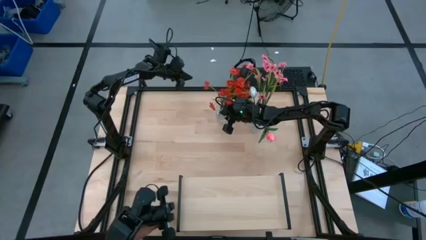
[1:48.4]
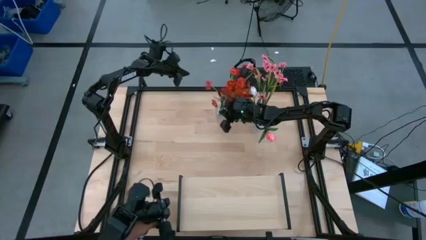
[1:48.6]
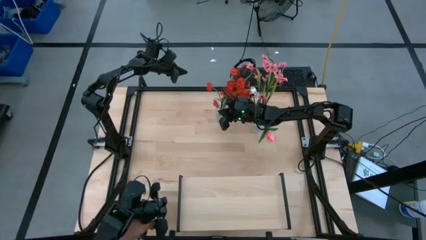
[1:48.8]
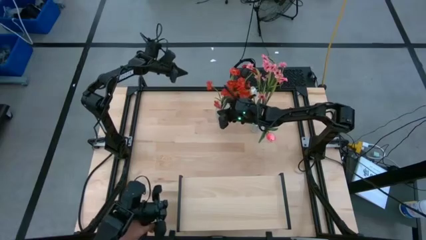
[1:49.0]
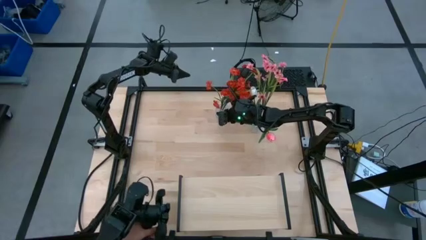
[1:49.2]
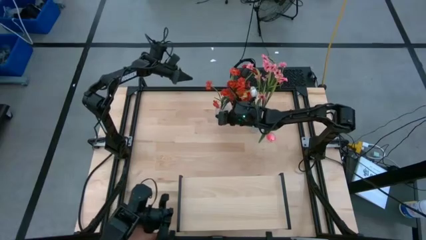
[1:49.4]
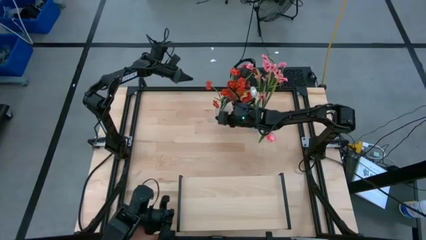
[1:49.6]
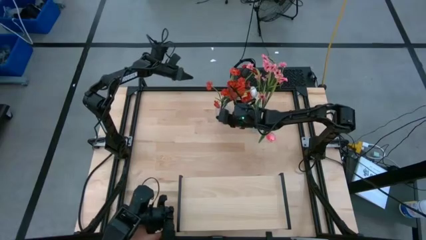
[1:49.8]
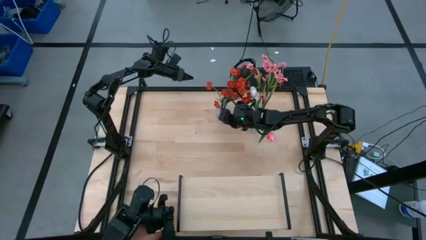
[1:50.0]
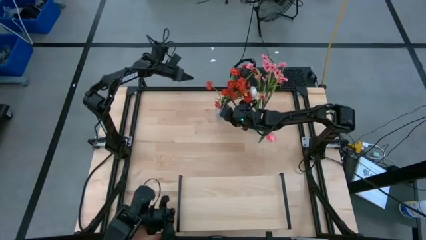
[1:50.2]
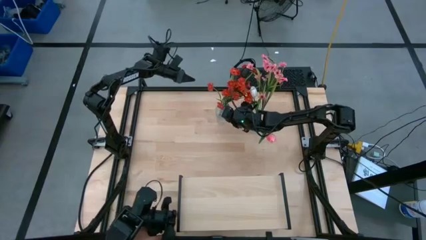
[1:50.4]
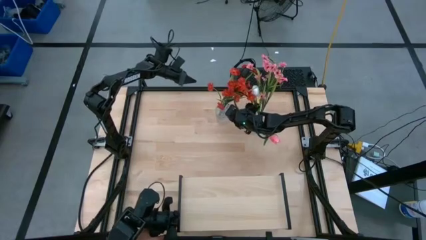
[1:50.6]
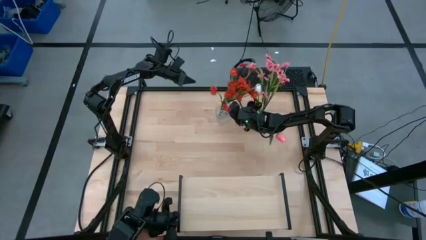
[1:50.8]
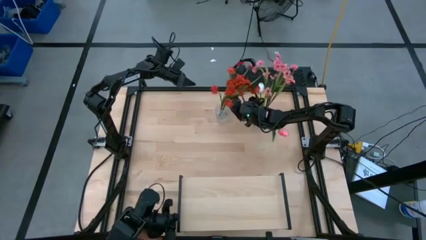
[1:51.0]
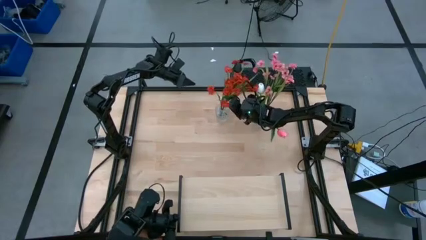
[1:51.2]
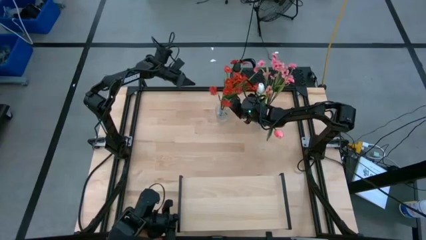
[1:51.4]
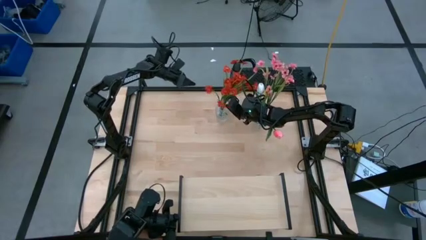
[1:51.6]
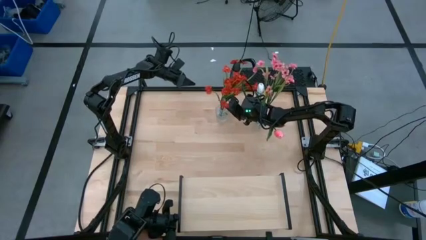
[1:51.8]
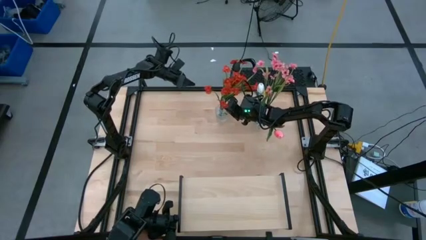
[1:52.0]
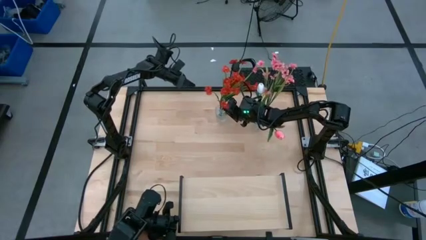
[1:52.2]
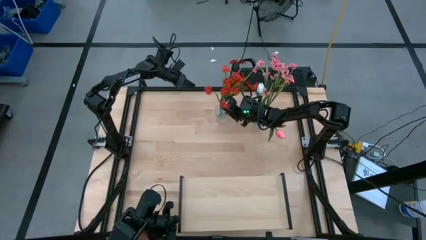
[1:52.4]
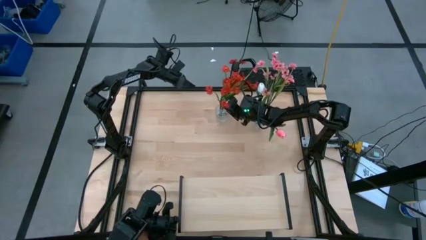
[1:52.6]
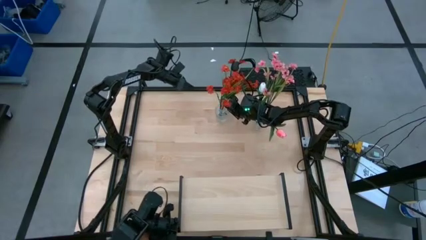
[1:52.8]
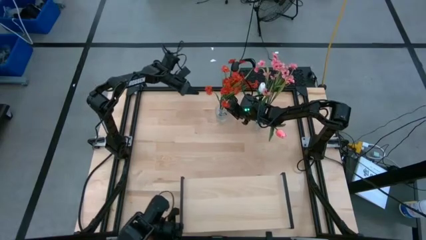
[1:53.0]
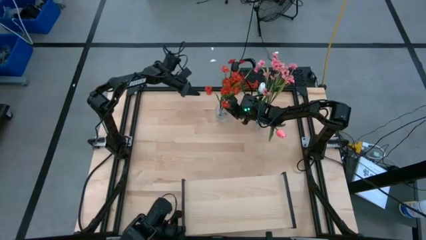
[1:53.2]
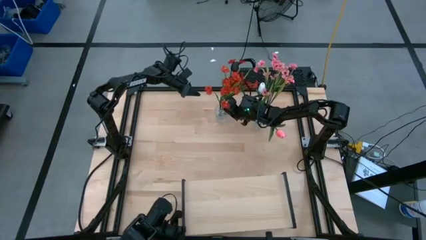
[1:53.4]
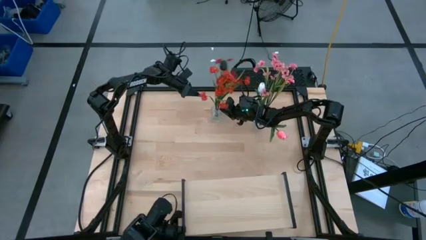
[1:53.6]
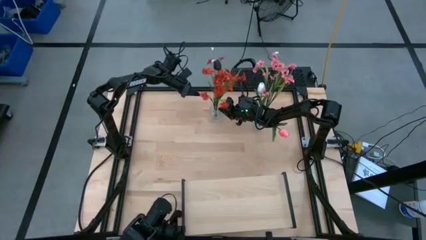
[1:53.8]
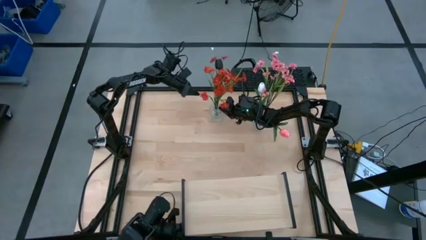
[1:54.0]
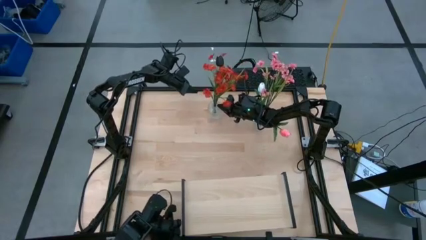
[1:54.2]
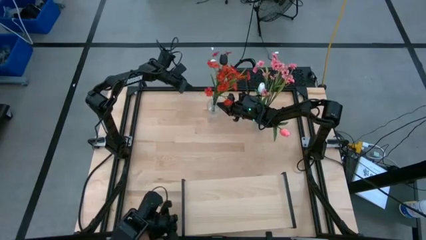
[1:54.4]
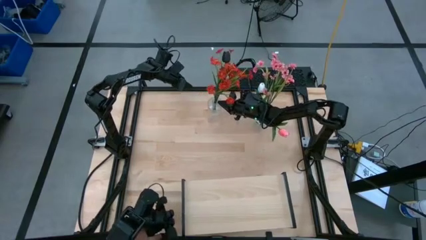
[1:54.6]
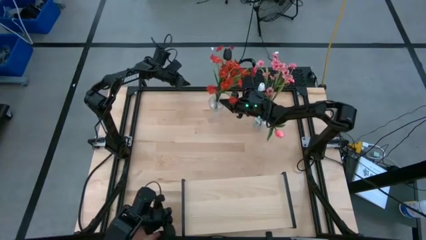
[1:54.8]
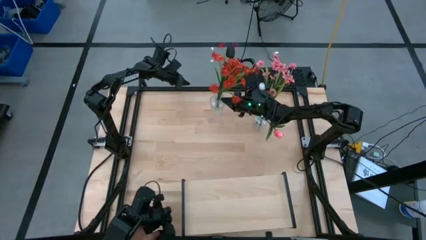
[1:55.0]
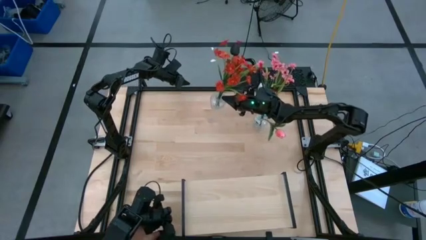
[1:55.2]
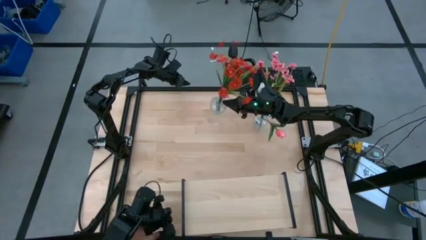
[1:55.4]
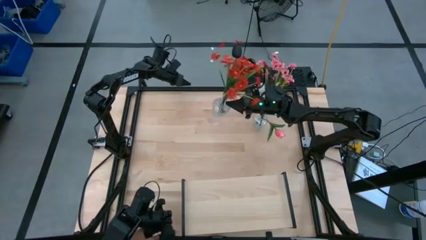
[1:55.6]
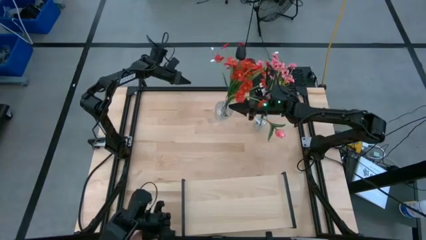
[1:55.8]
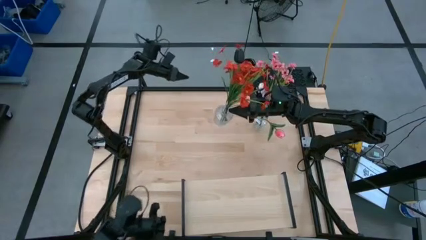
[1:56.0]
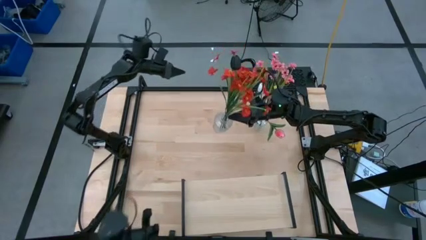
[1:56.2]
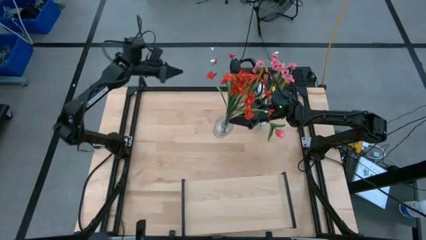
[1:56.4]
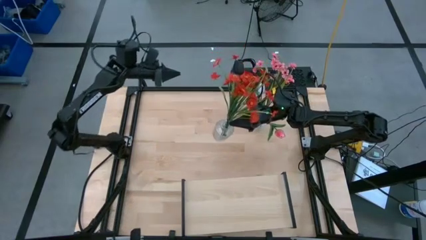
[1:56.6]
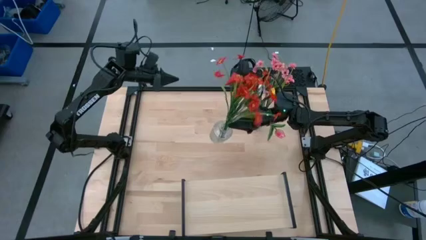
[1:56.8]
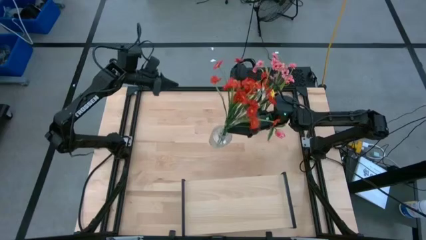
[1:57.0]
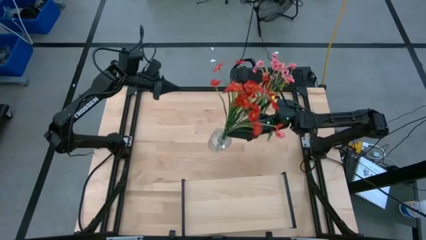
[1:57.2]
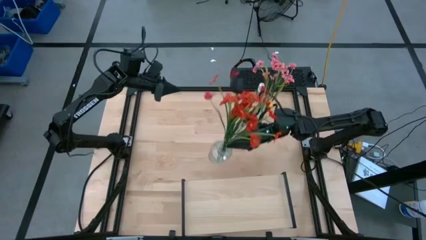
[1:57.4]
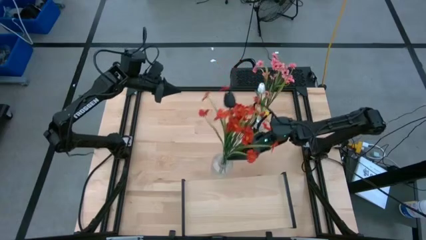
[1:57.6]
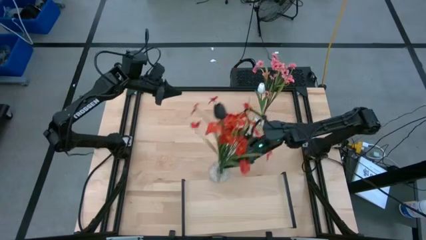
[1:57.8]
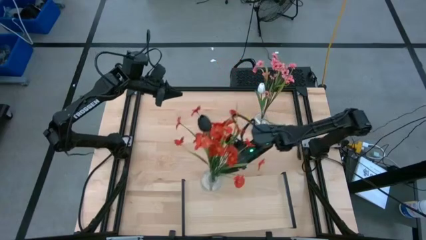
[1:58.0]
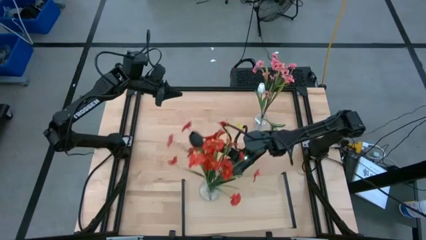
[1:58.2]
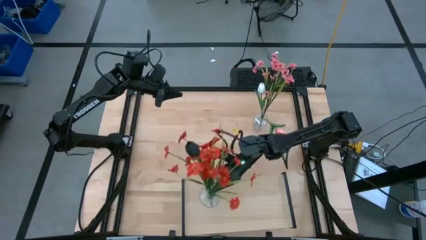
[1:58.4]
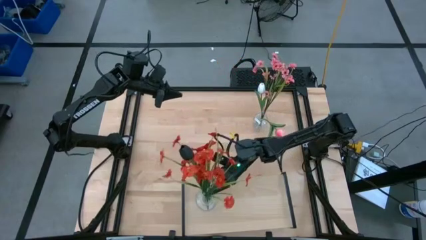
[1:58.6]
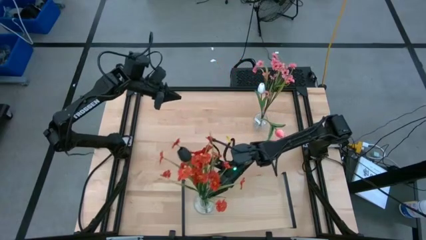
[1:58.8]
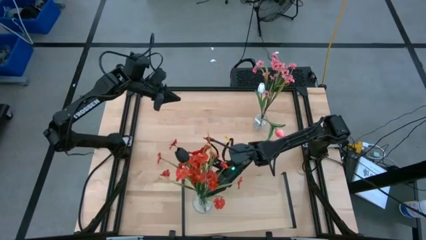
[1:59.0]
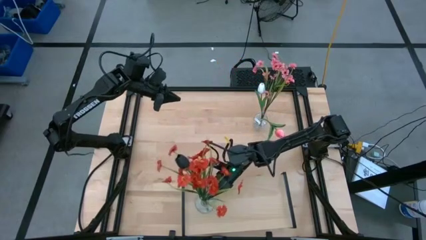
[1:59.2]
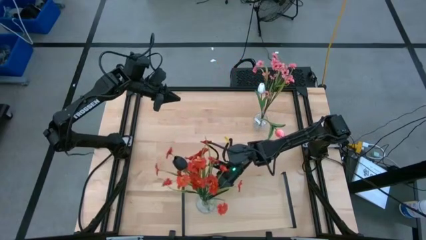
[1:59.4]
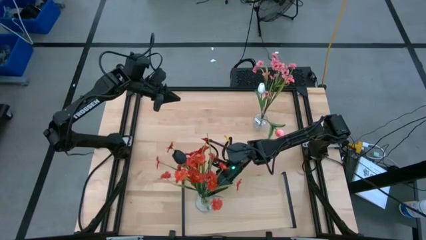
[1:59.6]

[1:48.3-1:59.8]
Task: Pick and place flowers into a vace then onto a shelf
Put the left transparent vase with flowers on the shelf

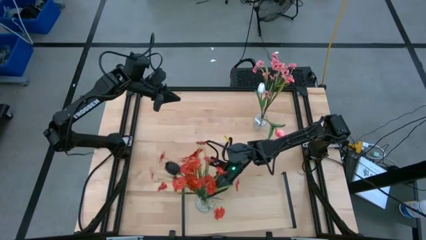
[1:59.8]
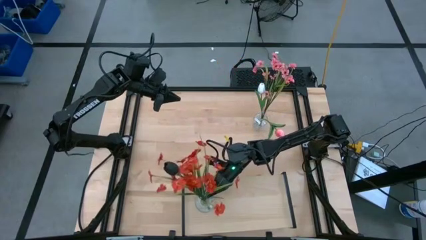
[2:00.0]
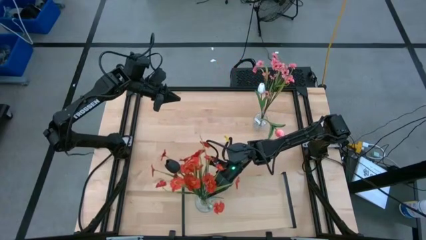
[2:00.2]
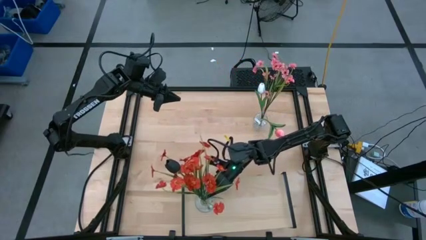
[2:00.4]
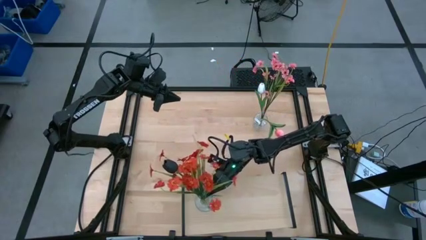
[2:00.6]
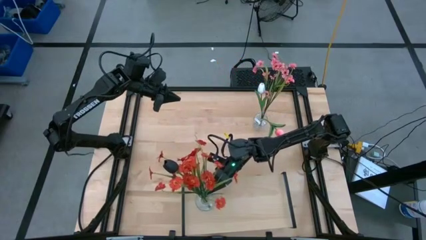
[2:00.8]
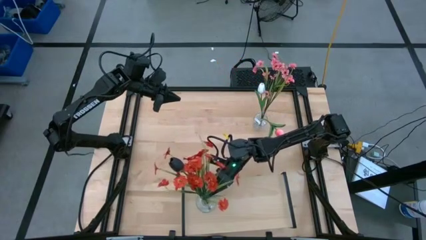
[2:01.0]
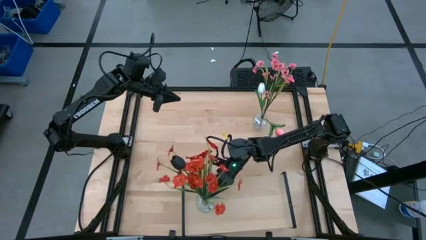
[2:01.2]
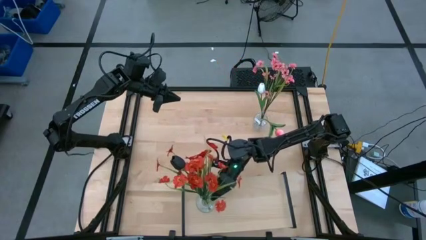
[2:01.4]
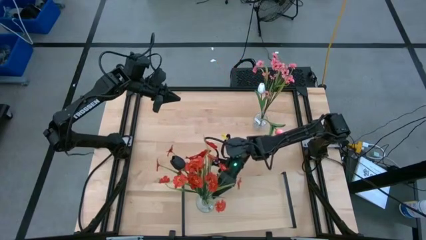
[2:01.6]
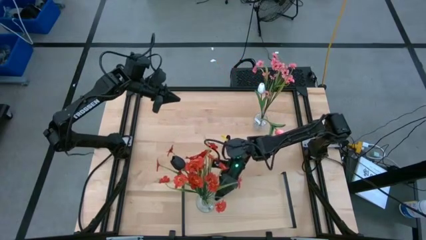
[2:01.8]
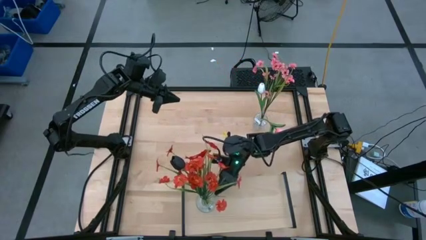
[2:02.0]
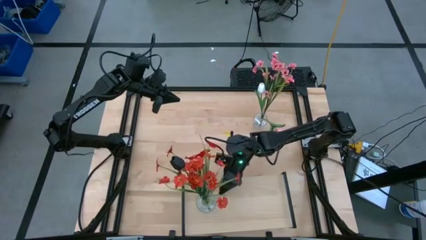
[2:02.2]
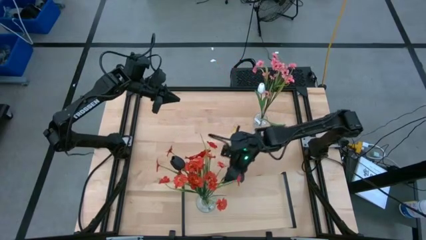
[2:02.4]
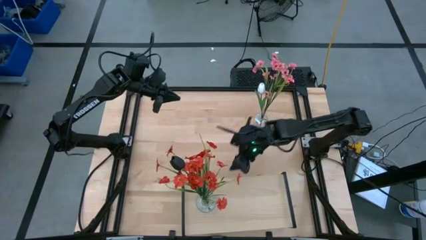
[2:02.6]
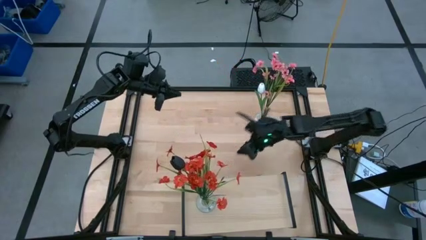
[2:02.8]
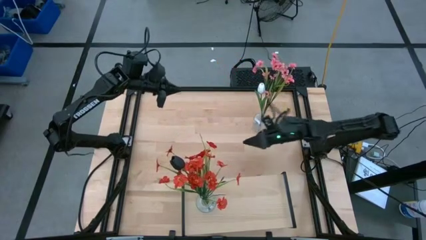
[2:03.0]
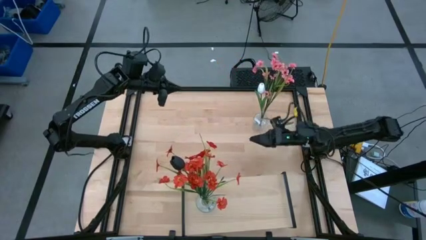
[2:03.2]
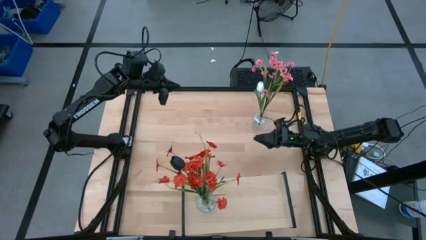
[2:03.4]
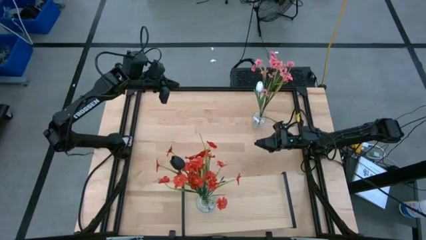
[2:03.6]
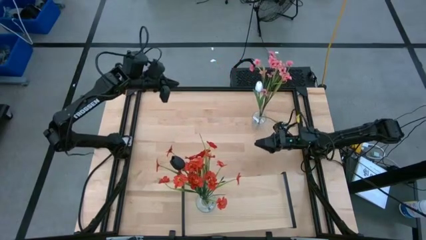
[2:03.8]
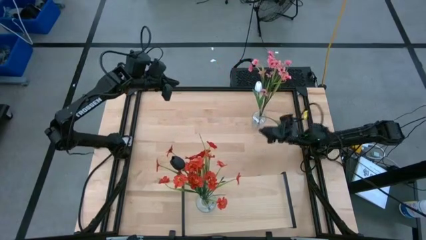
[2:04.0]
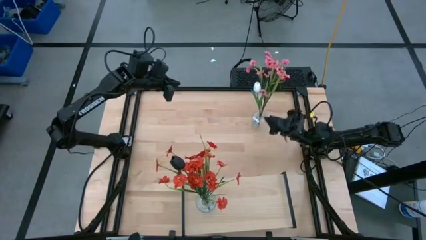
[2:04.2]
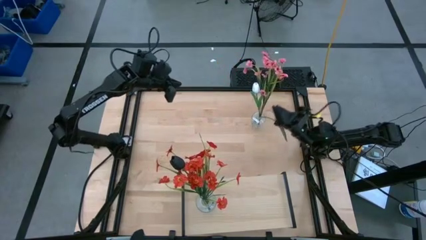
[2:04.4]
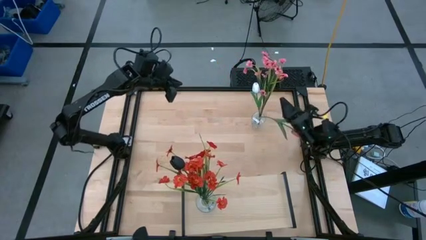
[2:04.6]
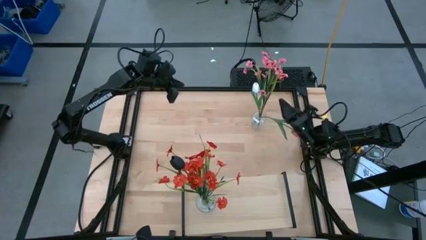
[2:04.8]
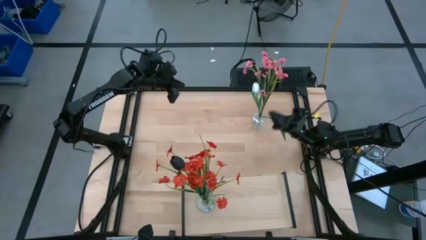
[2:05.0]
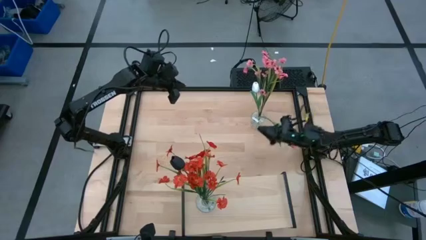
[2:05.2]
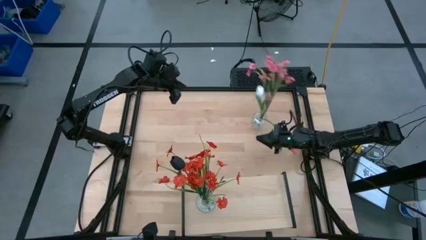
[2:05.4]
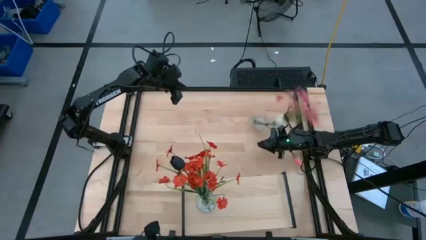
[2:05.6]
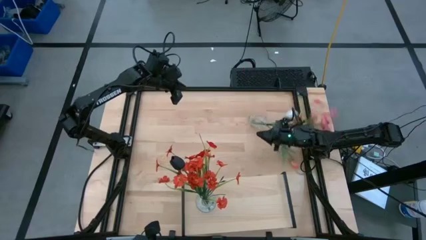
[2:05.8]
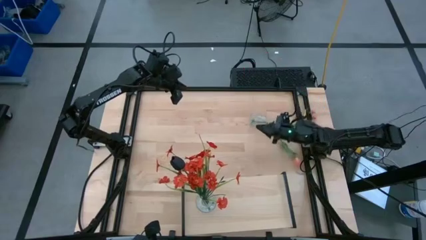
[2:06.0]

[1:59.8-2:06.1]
Put the transparent vase with flowers on the shelf
